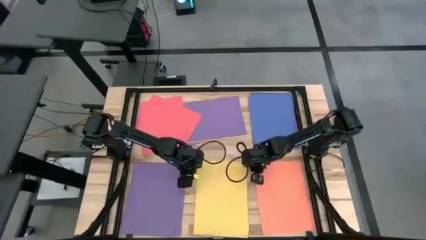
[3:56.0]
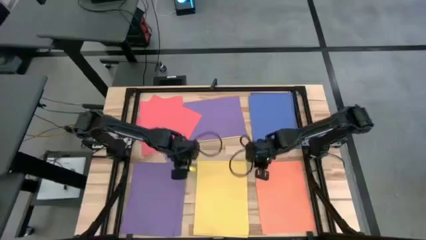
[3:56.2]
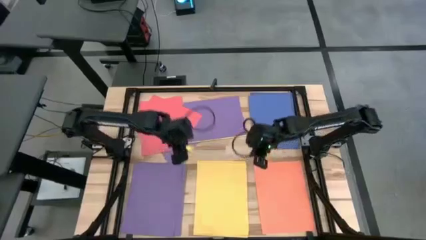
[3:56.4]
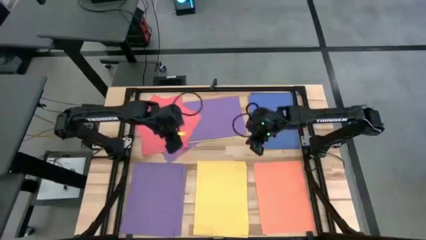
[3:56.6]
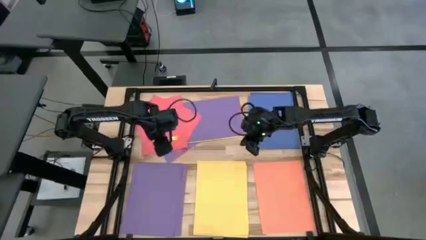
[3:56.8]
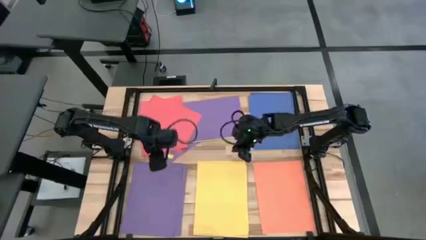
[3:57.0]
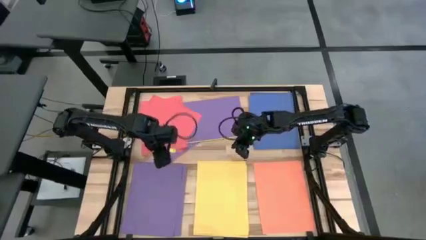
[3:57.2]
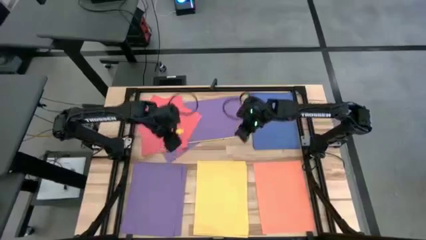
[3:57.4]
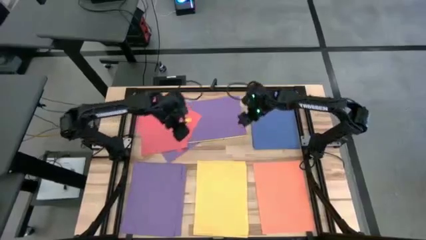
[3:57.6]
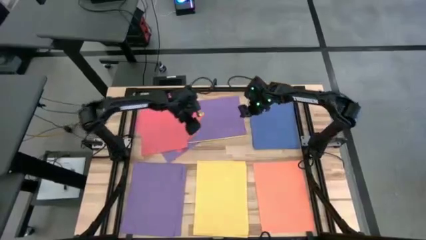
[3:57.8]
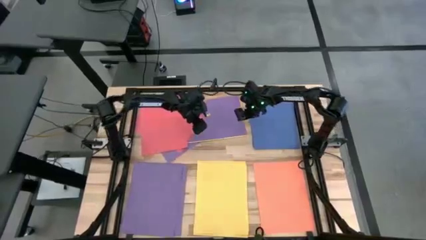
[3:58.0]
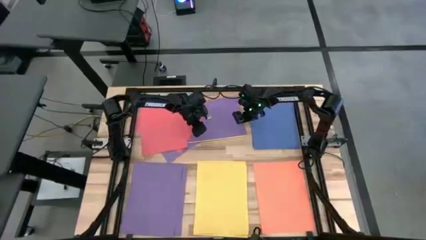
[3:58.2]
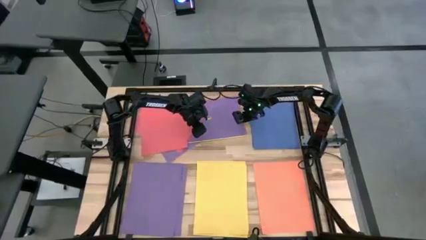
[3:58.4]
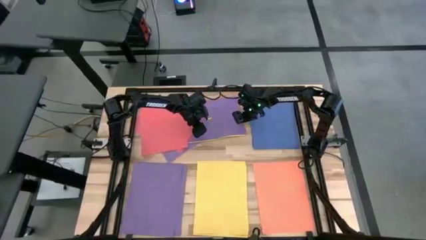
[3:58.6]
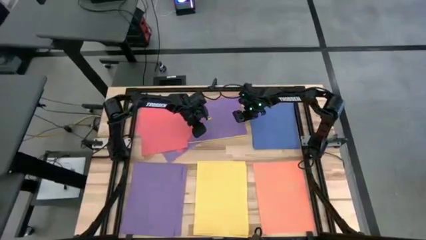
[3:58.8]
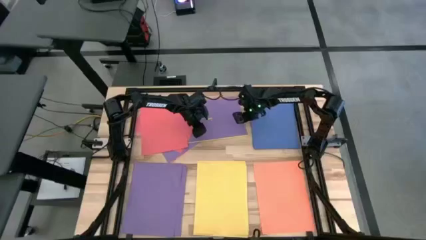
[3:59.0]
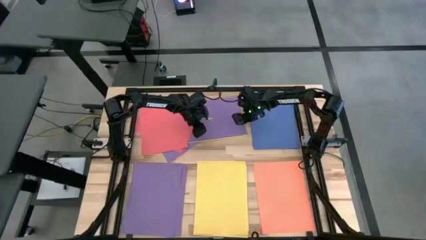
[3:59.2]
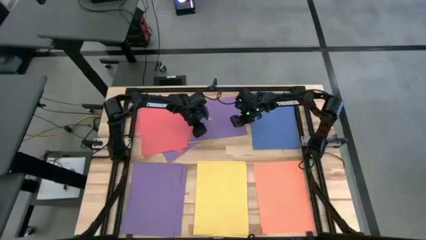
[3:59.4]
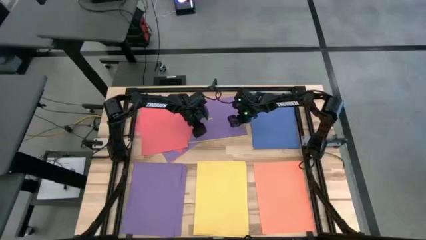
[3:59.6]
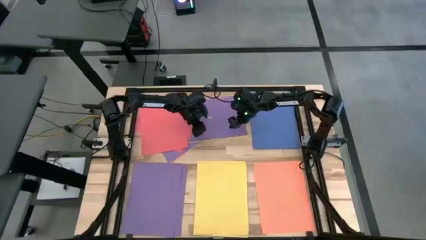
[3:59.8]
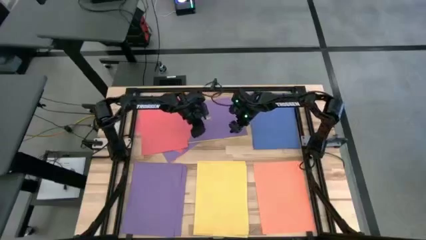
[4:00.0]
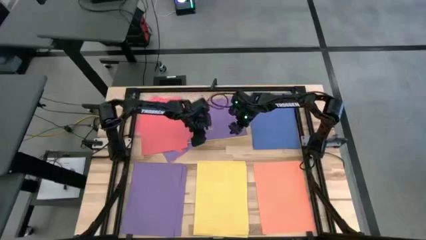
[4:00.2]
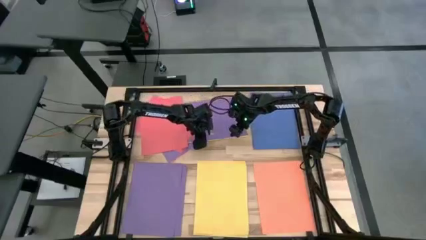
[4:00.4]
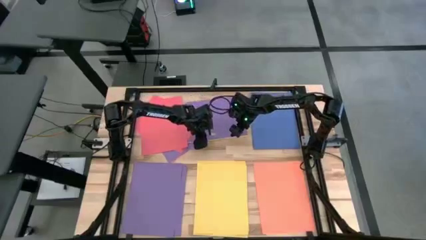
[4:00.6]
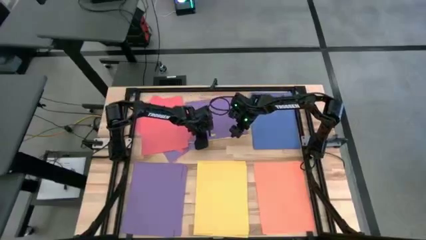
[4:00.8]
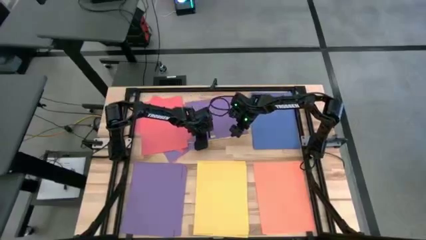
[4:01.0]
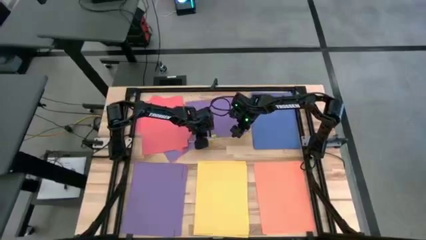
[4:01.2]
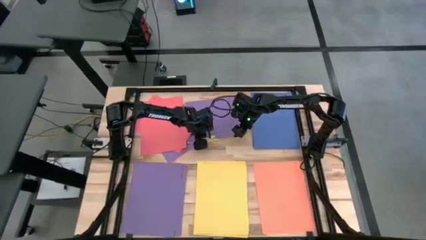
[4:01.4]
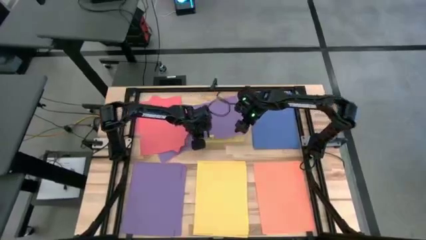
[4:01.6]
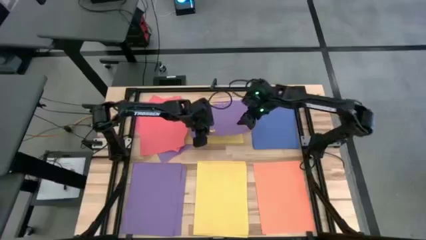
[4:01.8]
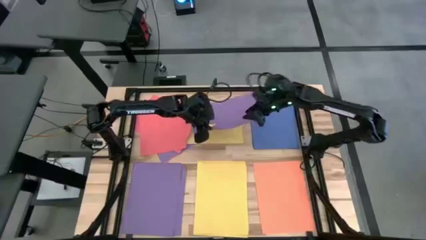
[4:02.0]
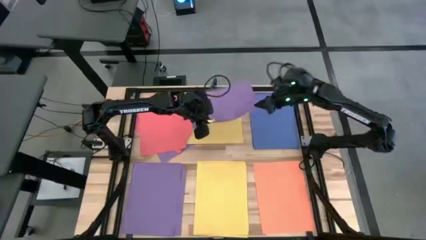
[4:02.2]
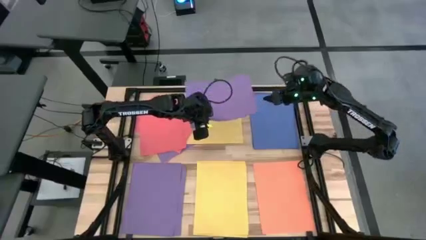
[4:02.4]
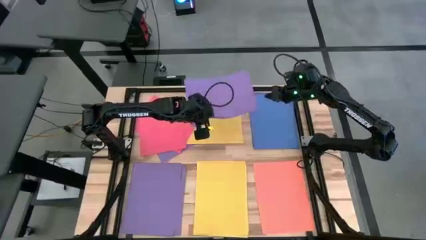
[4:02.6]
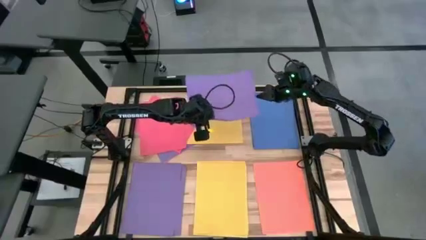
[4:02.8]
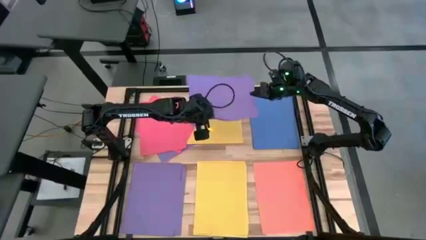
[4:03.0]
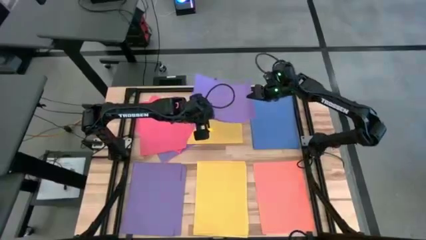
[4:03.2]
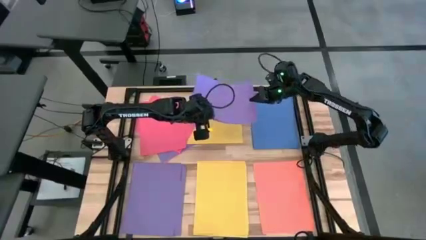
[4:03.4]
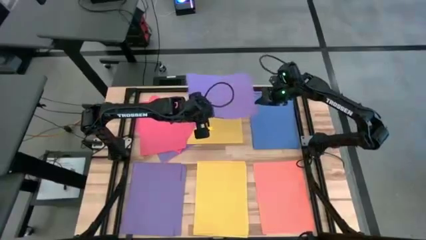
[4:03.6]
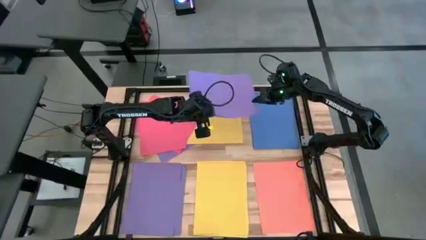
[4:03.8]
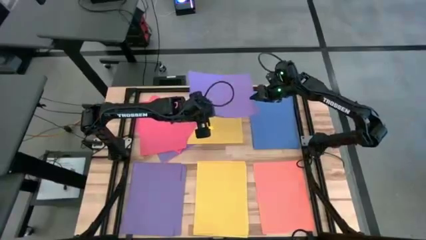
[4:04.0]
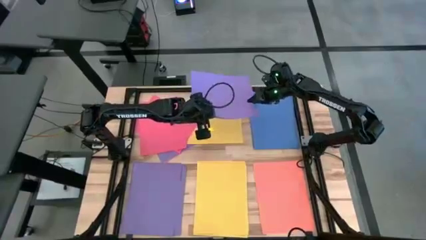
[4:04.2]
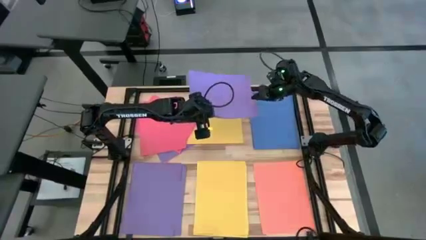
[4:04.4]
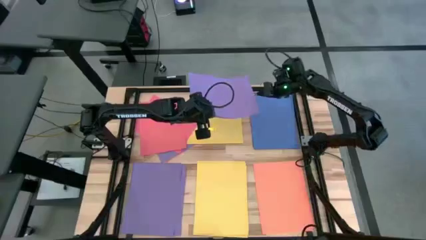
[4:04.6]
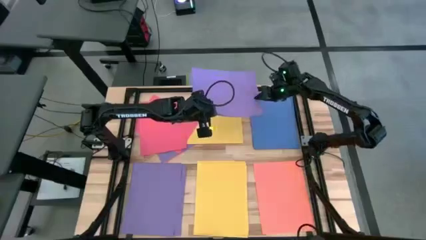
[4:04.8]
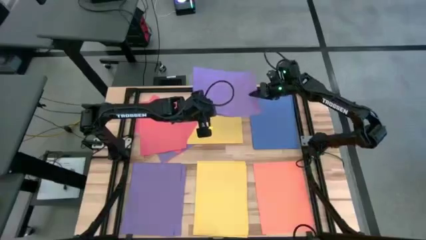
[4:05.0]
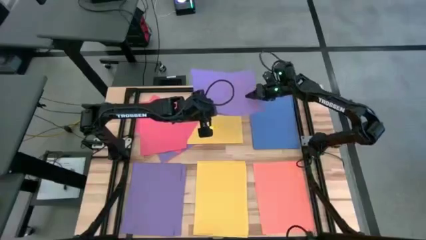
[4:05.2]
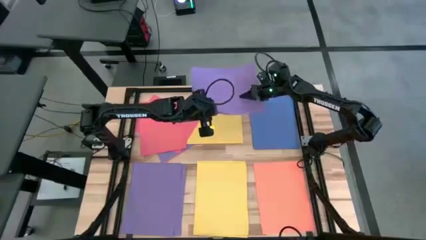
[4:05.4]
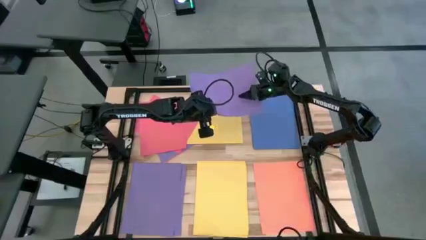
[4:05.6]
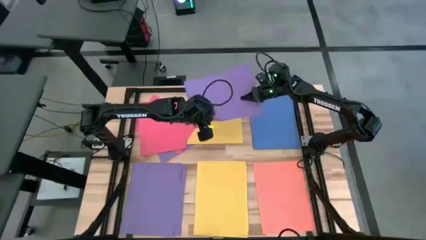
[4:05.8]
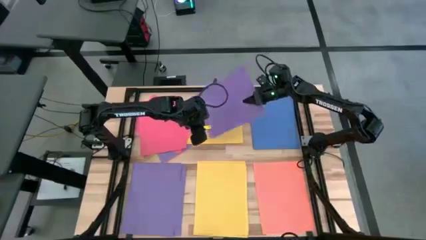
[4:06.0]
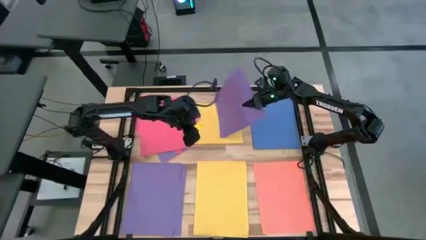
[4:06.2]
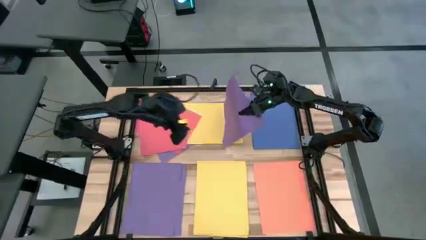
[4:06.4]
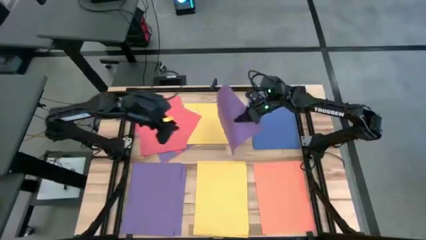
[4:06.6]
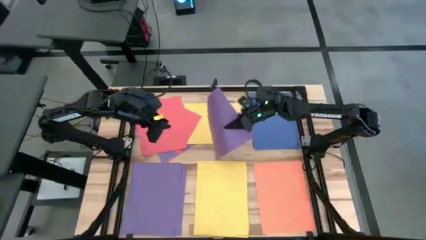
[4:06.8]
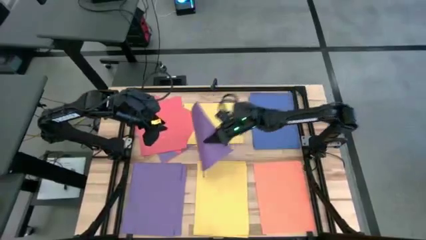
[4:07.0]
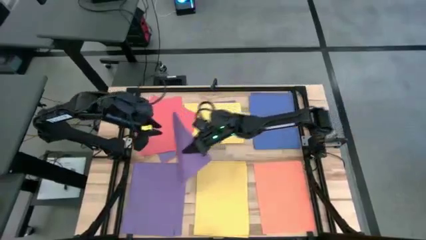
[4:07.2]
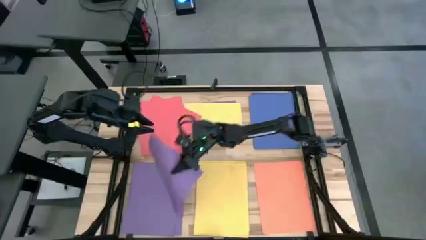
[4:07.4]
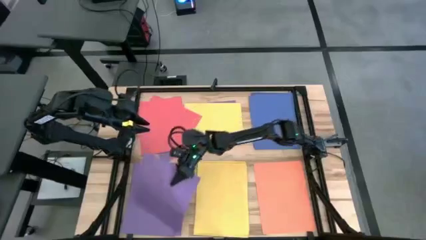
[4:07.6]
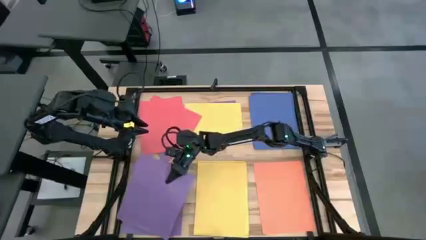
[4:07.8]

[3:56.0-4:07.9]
Task: Organize paper
Stack the purple paper on top of the purple paper
